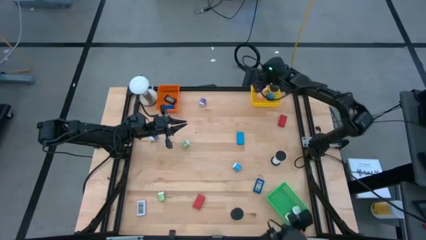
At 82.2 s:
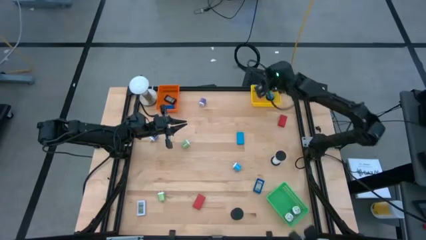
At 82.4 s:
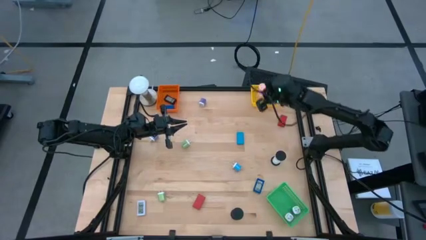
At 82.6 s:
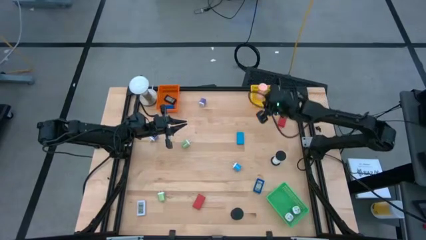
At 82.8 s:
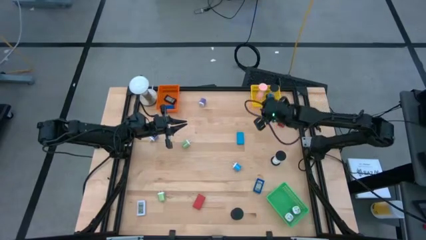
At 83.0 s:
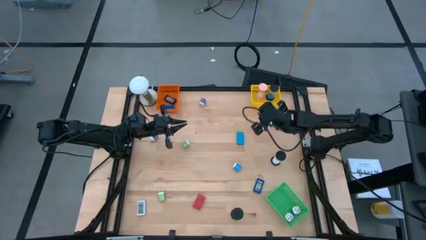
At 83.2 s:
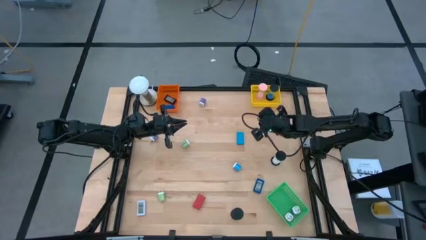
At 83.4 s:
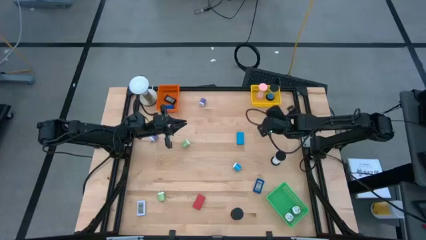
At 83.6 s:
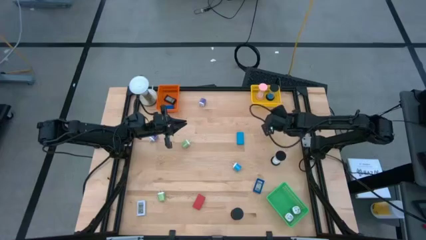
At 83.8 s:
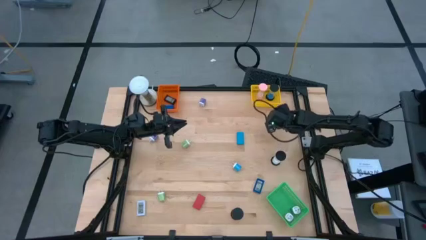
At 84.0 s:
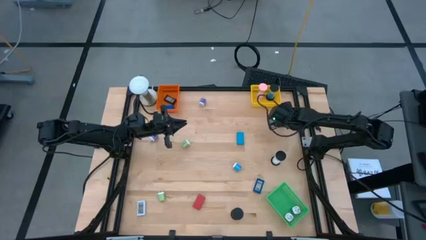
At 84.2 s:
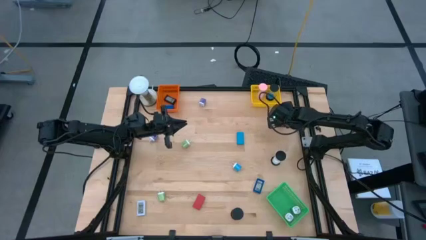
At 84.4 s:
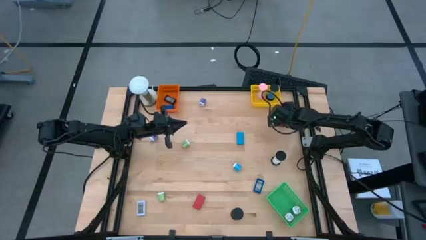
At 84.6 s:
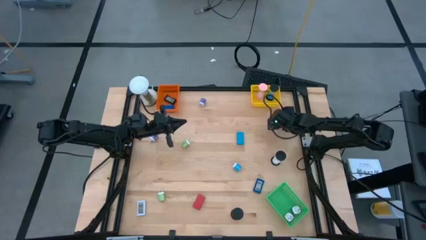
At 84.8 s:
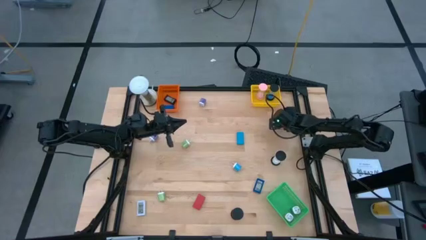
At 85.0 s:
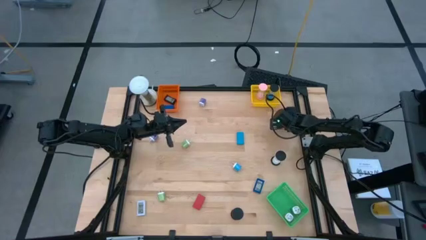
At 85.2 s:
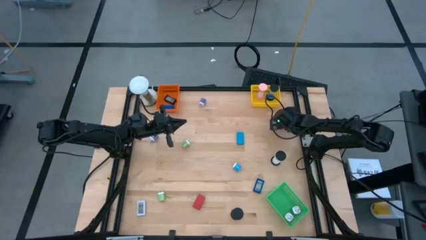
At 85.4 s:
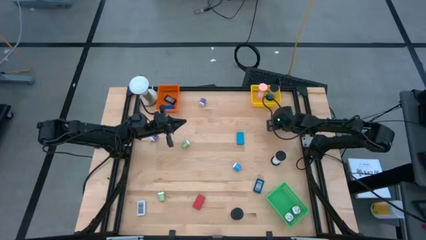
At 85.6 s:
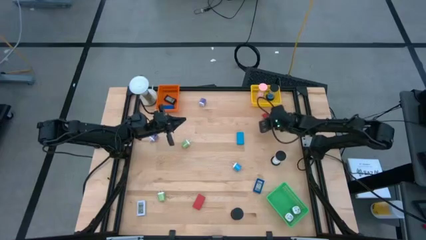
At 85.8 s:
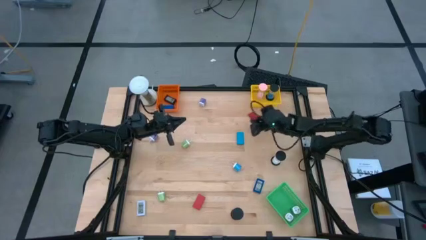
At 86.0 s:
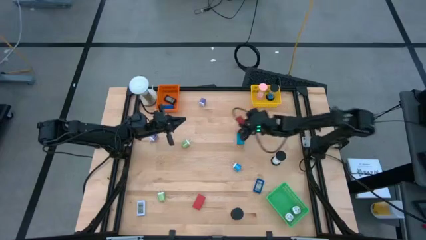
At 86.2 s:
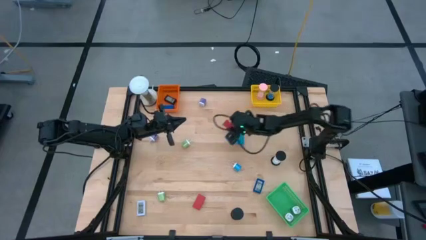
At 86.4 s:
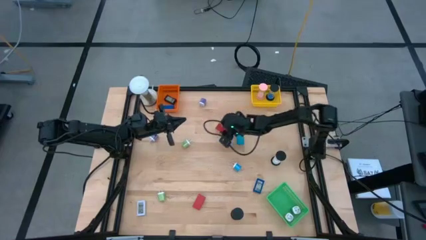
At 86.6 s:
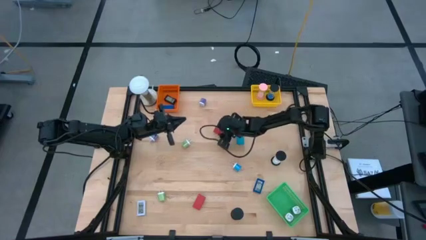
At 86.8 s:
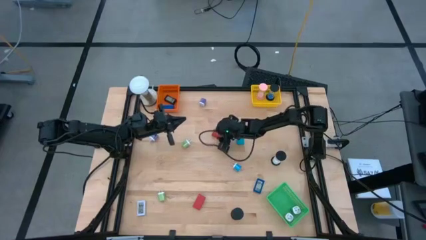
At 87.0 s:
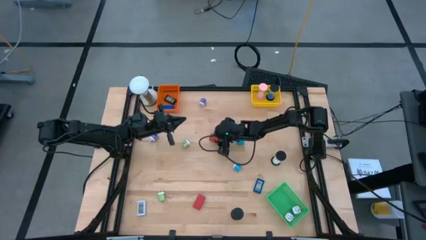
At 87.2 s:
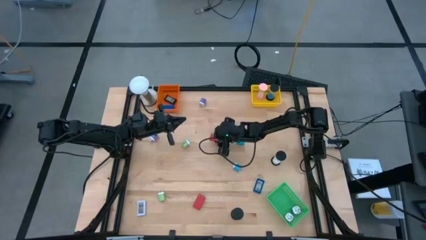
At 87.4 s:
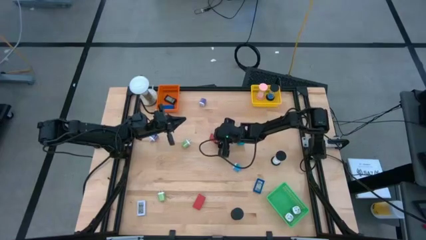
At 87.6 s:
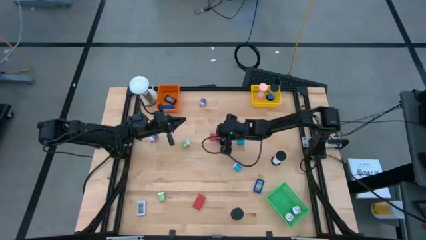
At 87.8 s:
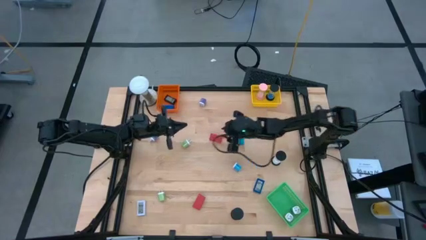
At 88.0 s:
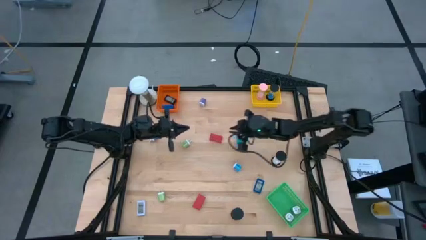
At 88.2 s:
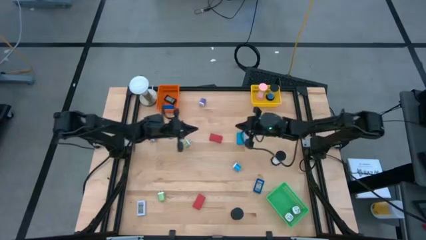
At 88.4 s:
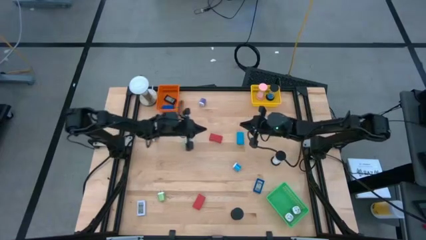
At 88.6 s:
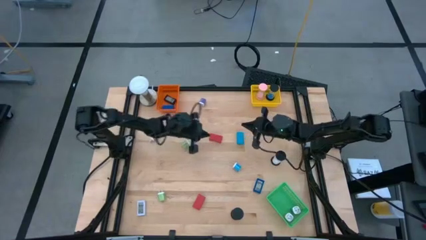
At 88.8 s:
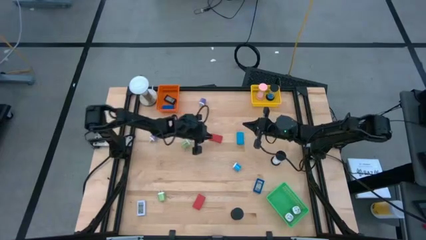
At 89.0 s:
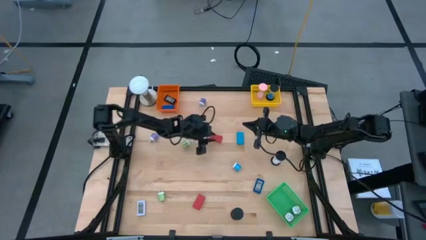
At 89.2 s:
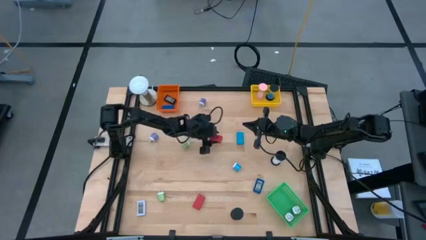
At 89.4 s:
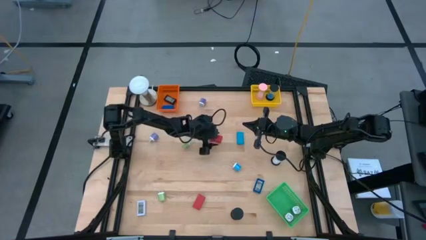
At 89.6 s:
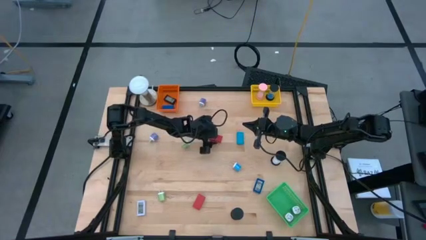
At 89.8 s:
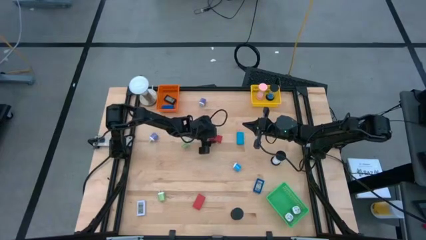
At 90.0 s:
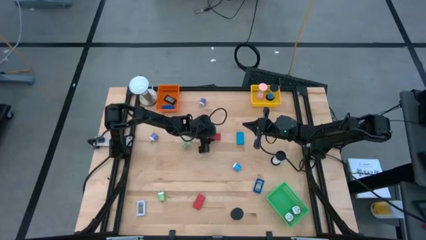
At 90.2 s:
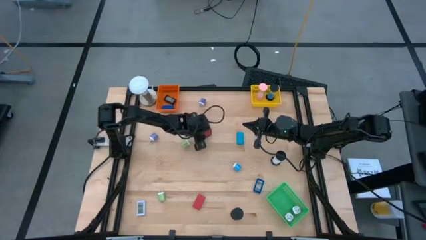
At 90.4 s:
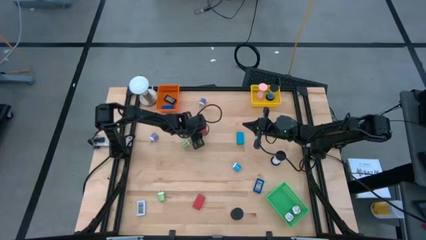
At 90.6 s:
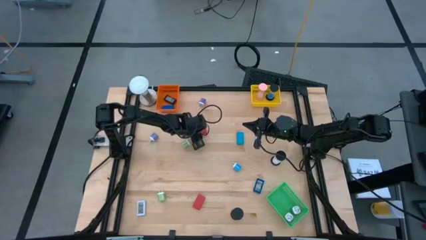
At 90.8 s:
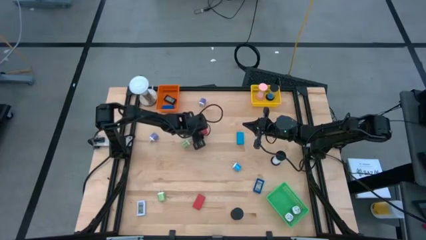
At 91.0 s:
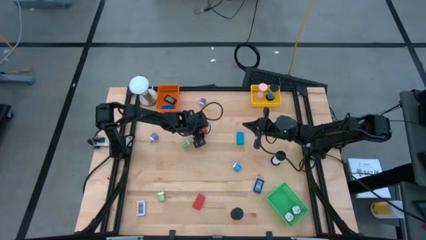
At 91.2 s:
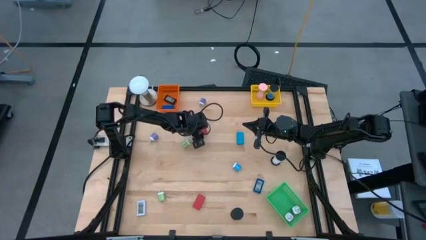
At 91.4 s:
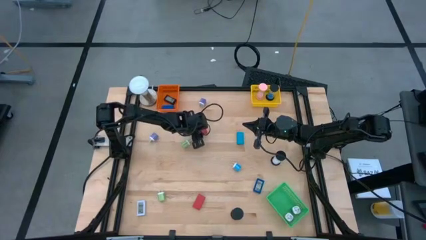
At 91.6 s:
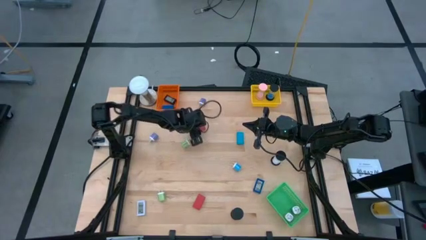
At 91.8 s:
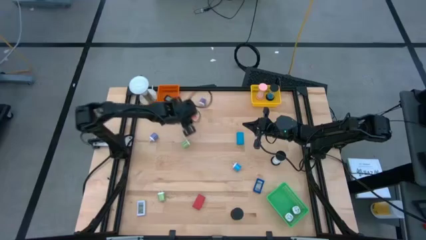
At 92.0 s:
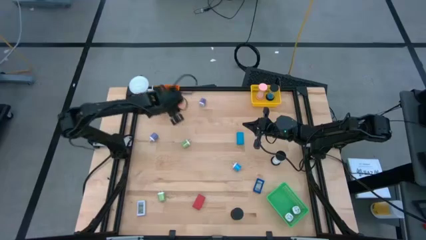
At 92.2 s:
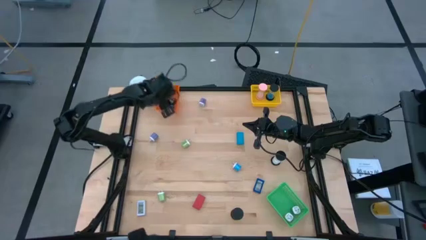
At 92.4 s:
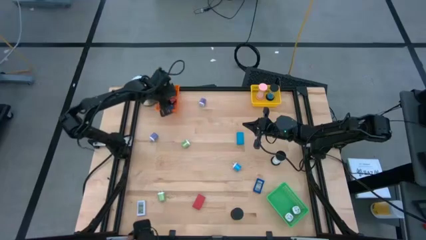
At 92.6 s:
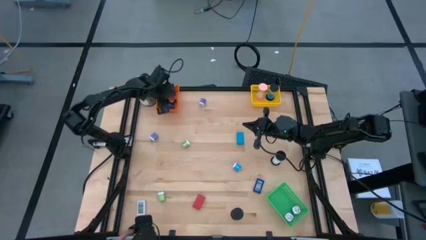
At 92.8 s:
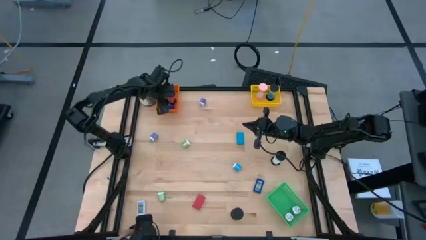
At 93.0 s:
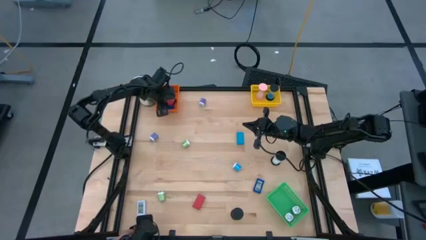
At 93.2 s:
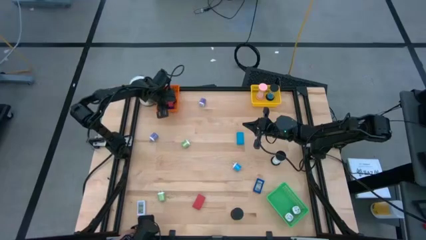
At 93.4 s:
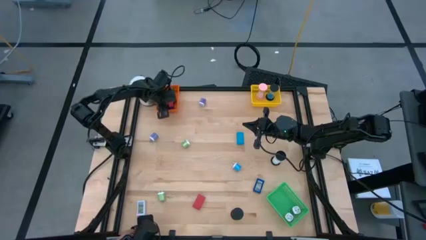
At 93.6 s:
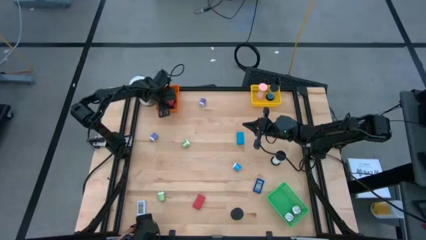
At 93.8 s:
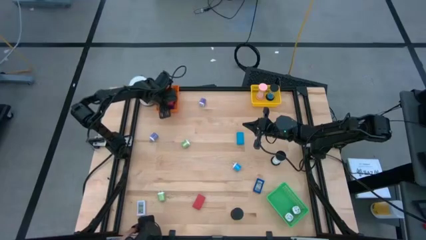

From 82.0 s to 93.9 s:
Task: Pick & Place Office items
Put the top red digital clock into the orange bin

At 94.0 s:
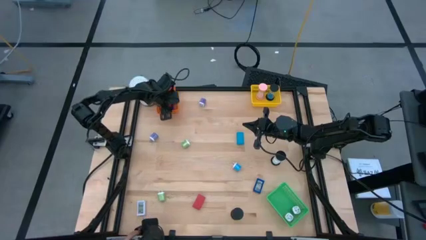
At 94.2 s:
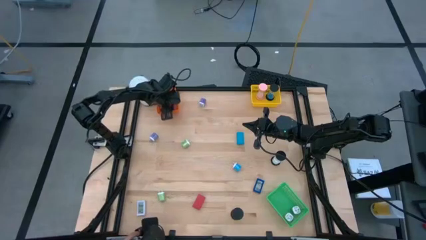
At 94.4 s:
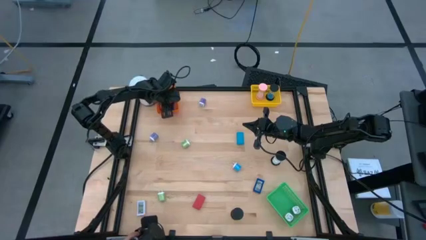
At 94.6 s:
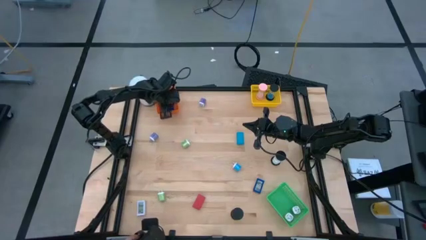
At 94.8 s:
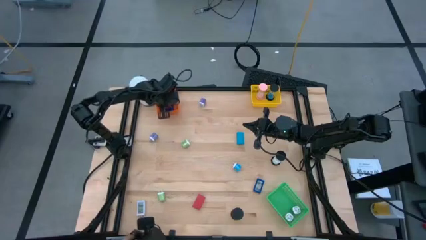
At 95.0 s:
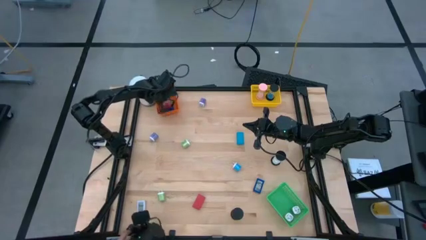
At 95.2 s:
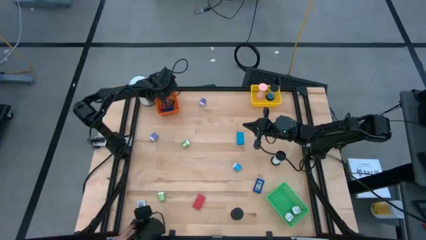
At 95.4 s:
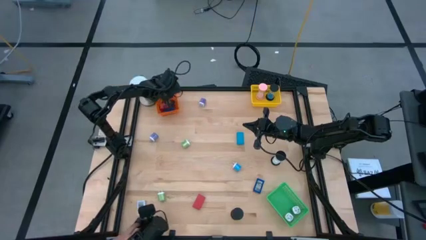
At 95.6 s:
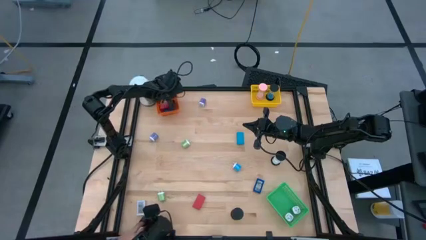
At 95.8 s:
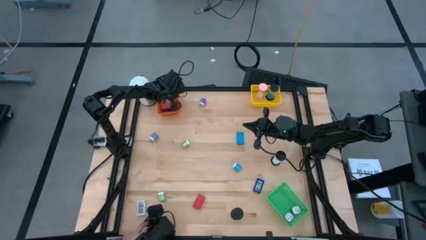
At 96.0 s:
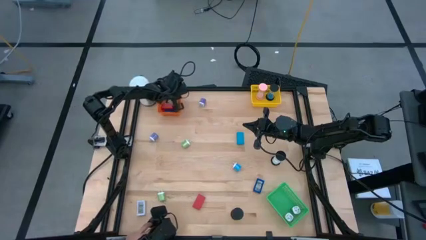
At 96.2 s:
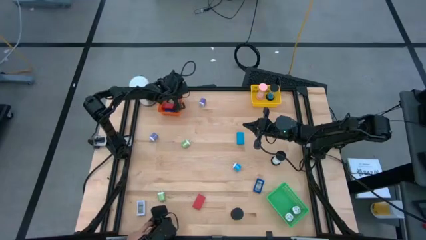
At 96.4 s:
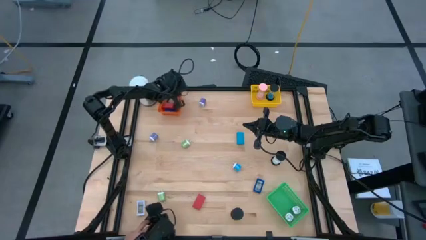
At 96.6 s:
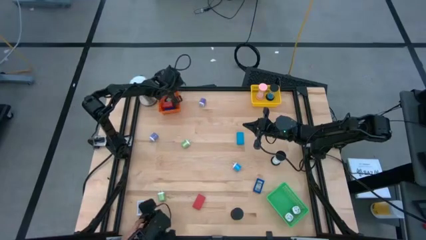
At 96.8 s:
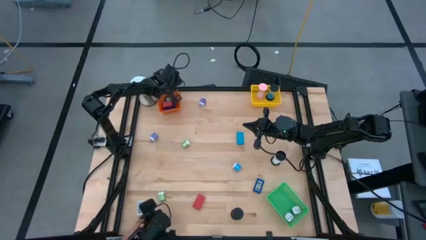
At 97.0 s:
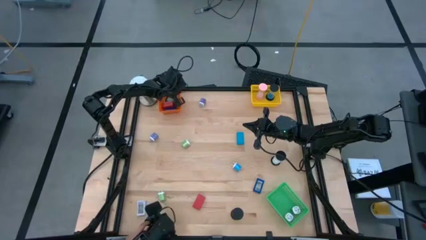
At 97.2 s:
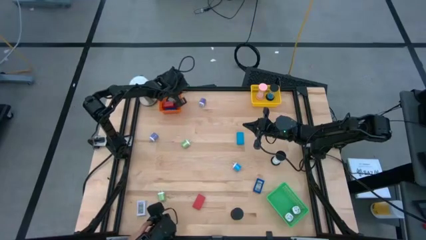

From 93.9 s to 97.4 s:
Adjust the orange bin
